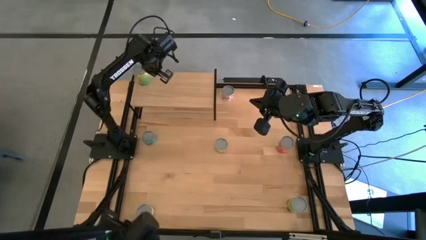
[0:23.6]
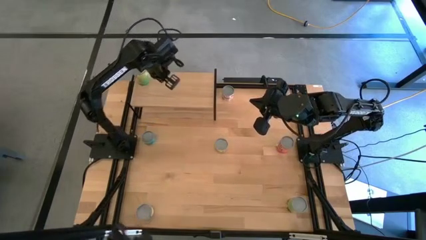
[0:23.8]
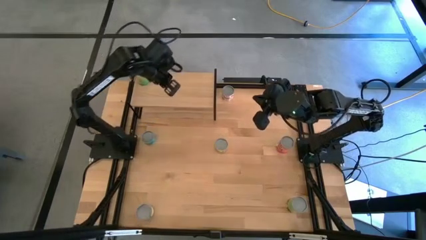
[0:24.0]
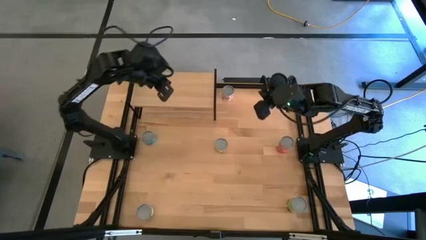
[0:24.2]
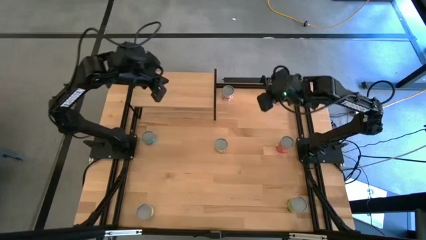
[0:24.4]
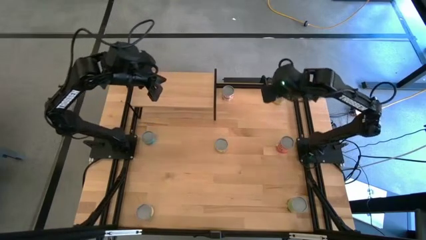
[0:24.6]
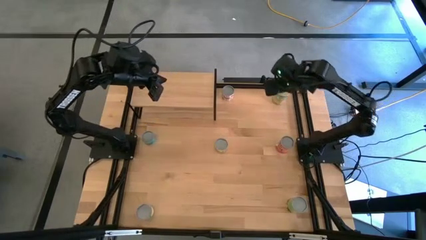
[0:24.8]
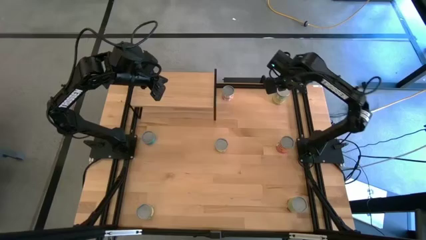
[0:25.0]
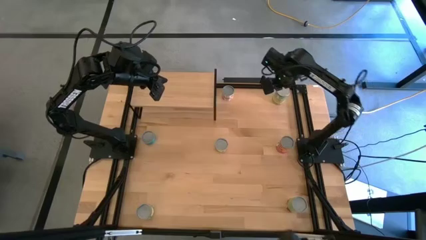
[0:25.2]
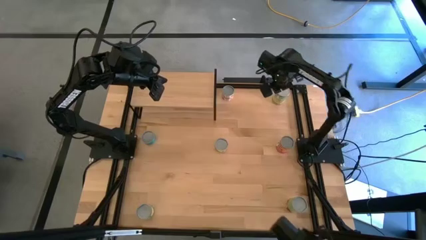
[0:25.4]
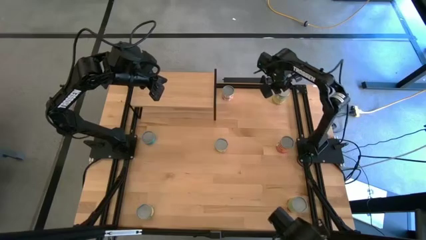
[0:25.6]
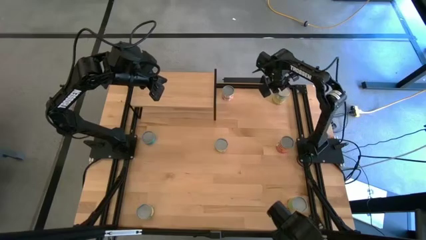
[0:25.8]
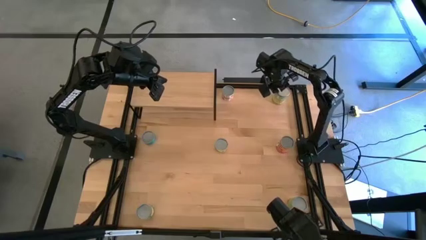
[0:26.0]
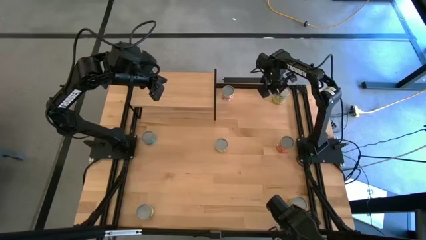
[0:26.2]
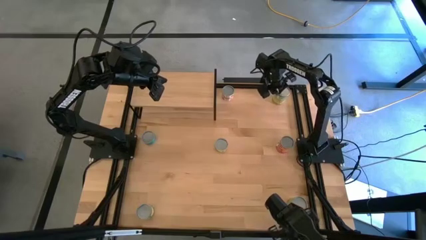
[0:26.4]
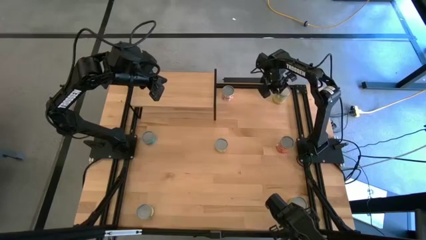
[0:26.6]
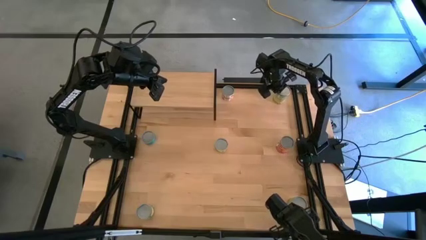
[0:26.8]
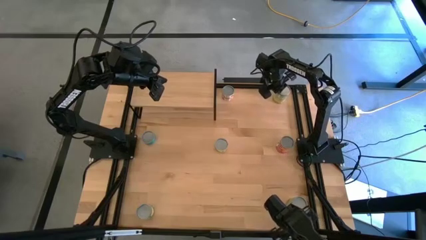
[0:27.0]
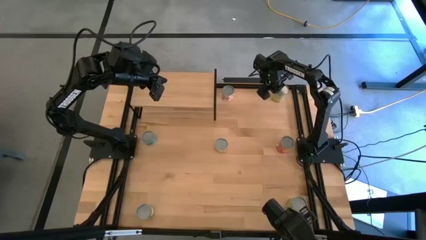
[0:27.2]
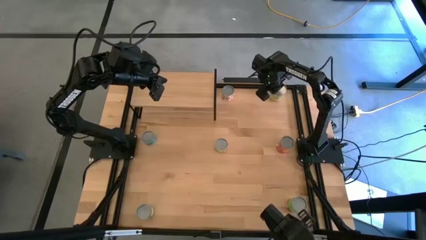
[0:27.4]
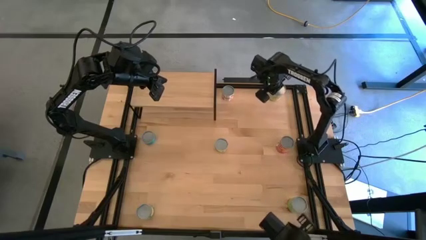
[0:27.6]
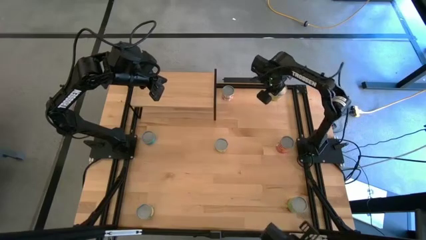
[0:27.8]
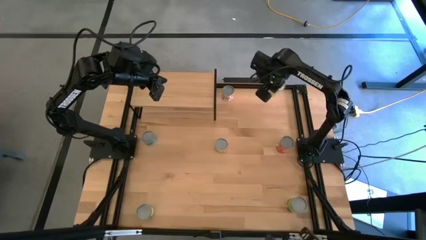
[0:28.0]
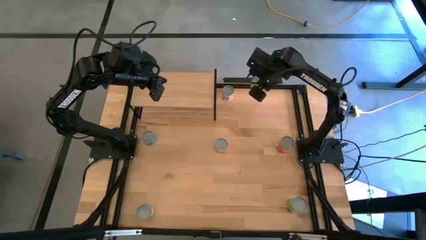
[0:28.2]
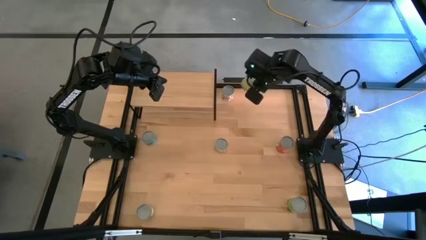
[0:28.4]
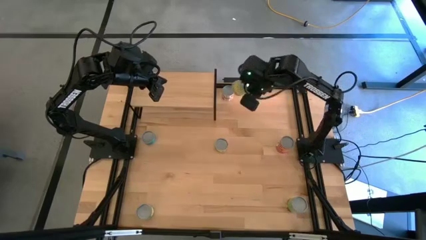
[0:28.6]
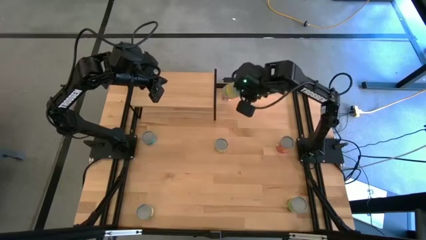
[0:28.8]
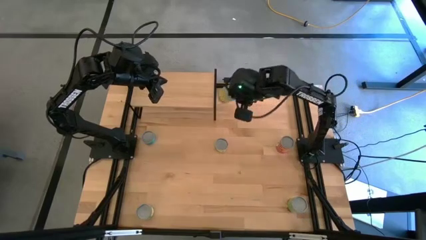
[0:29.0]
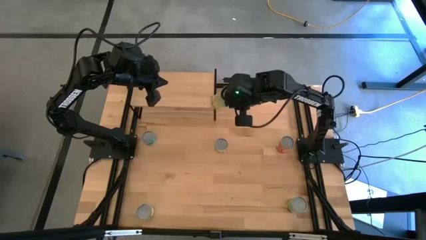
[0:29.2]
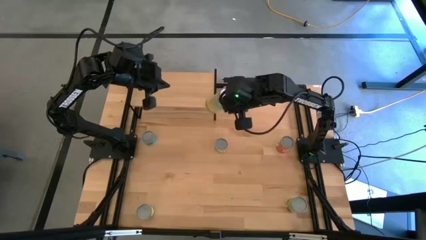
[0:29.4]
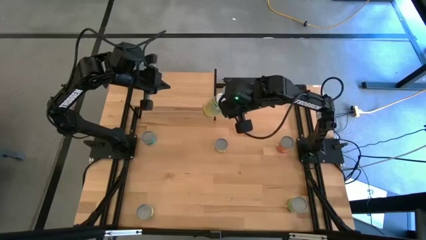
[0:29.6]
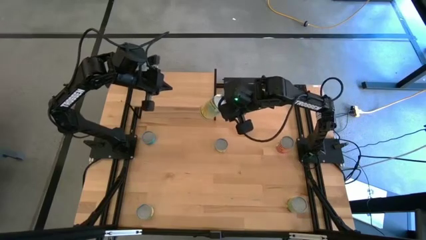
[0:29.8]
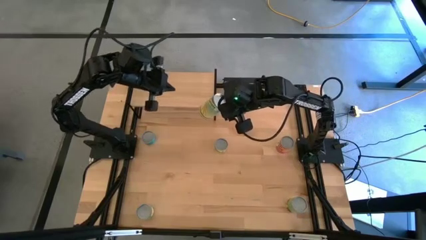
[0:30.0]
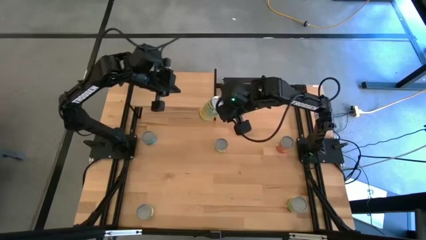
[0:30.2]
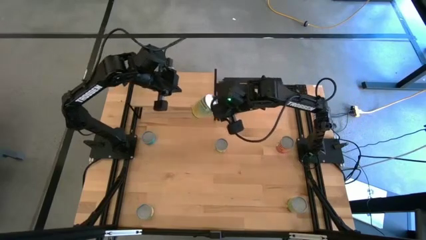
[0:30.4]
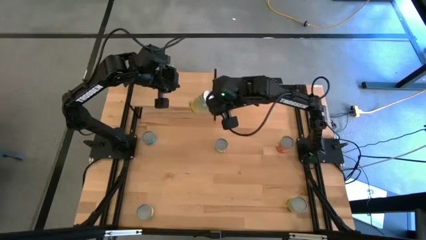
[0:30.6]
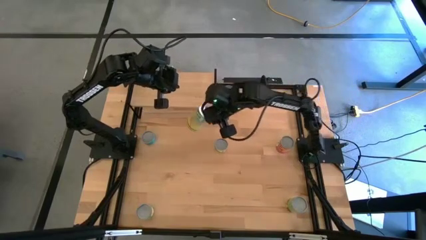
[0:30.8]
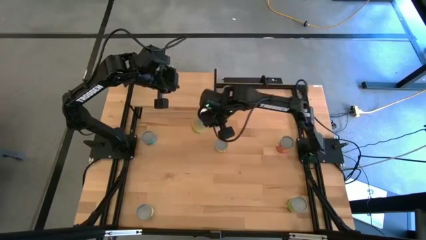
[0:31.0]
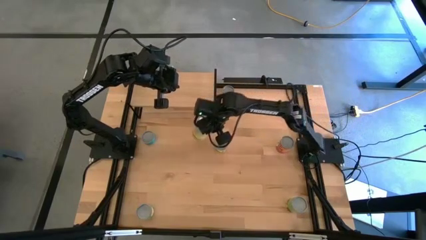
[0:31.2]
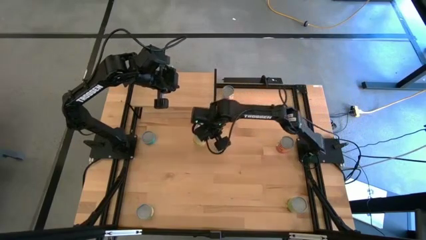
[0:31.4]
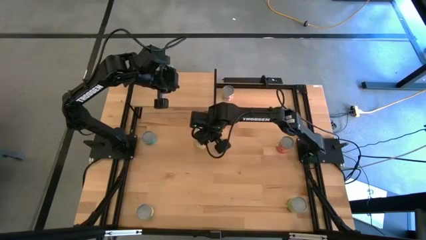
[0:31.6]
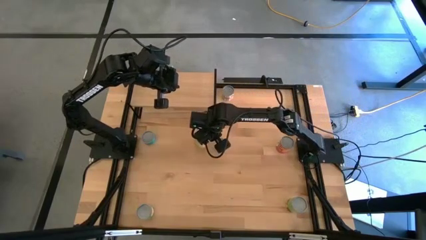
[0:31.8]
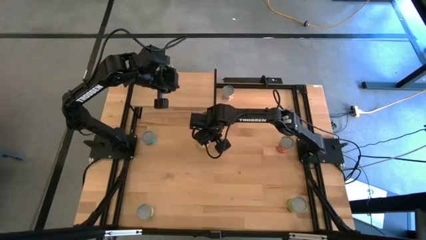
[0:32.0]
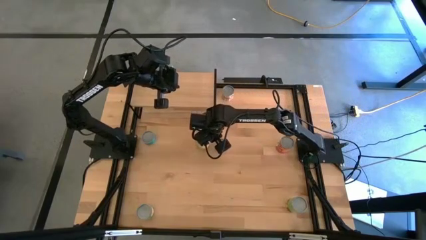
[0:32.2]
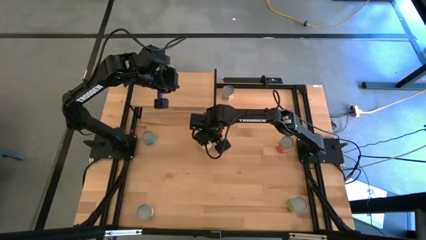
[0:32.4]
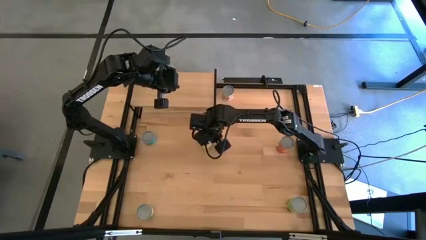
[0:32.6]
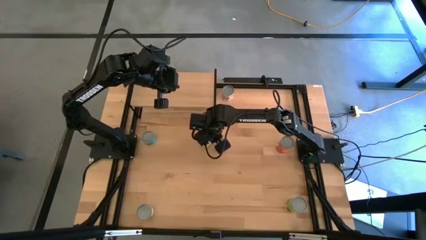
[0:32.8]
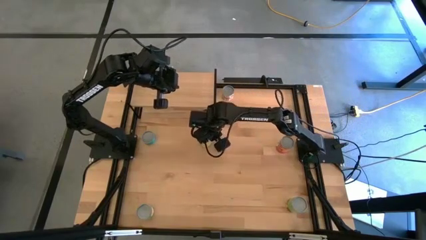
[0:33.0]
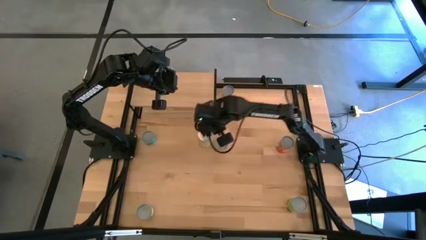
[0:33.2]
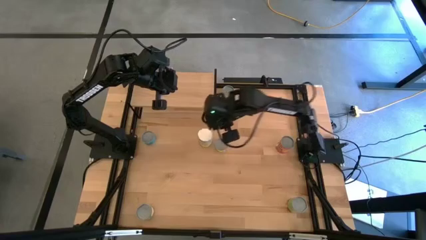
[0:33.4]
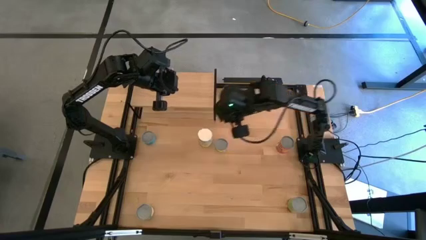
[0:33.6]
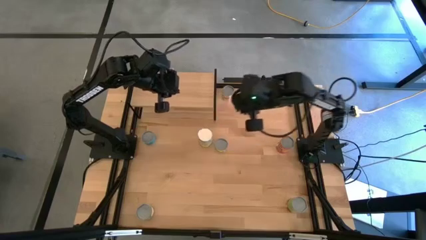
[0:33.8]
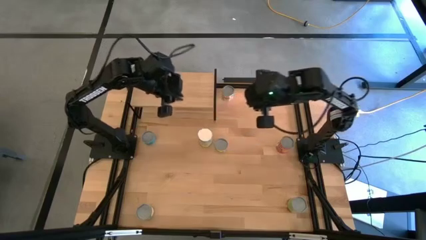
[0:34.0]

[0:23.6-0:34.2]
Task: Pick and place cans onto a shelf
Put the canned carrots on the shelf

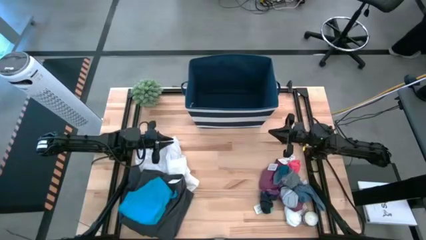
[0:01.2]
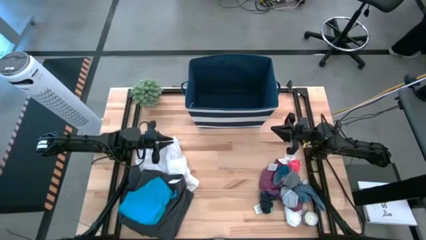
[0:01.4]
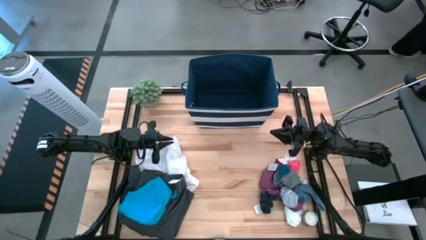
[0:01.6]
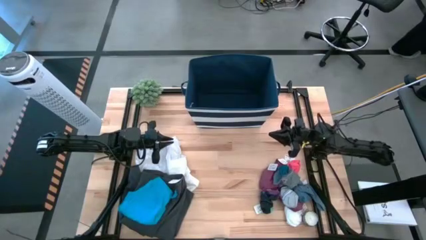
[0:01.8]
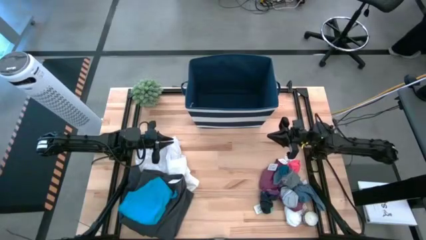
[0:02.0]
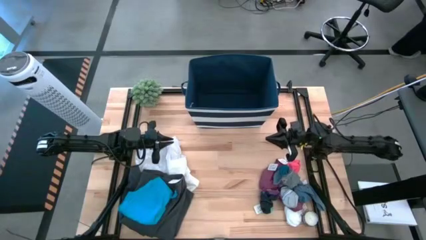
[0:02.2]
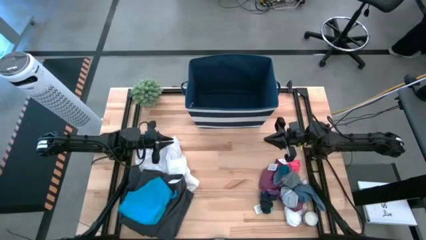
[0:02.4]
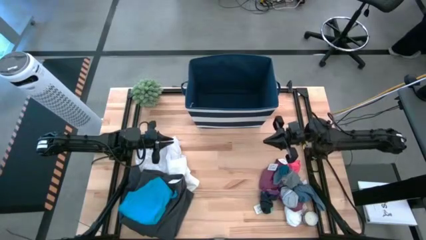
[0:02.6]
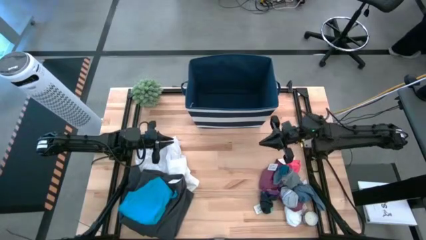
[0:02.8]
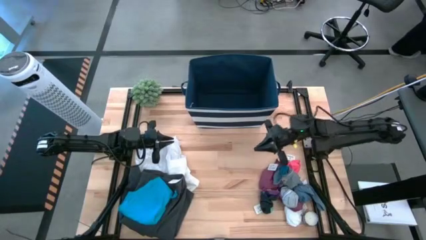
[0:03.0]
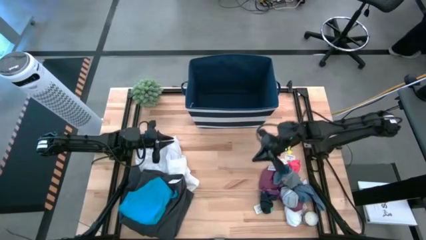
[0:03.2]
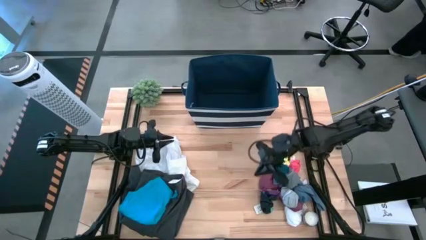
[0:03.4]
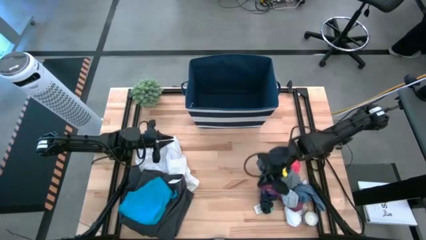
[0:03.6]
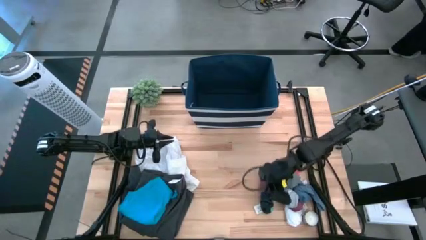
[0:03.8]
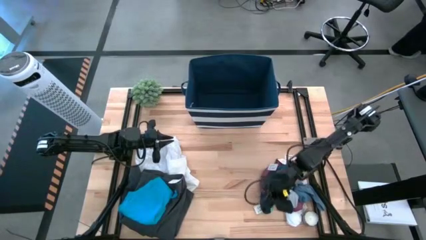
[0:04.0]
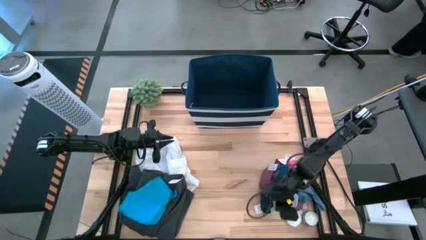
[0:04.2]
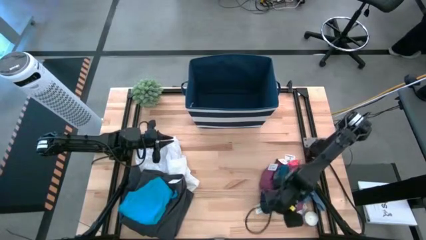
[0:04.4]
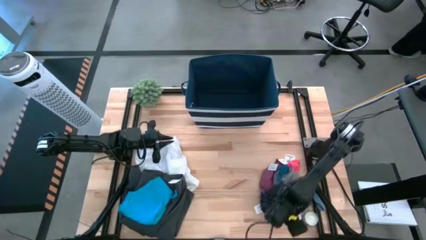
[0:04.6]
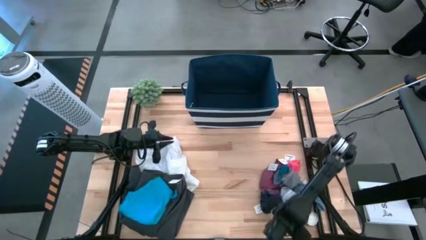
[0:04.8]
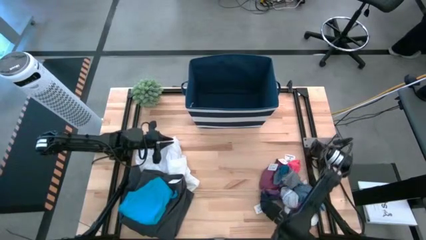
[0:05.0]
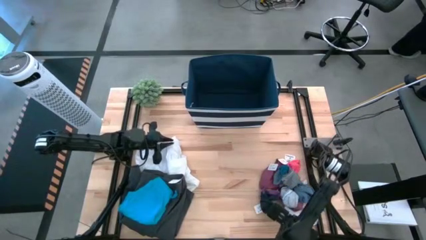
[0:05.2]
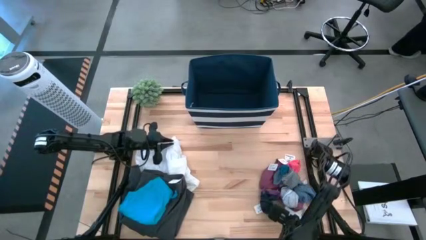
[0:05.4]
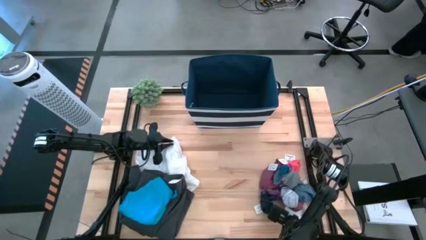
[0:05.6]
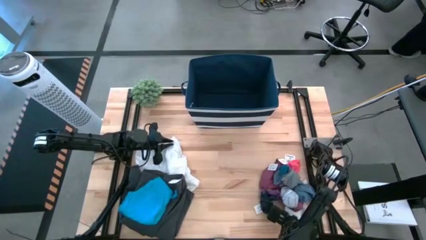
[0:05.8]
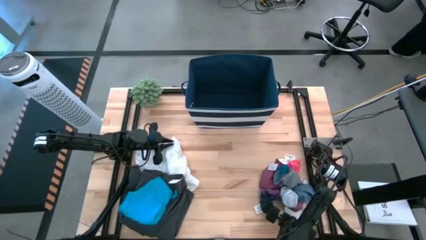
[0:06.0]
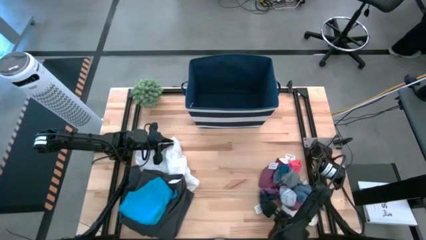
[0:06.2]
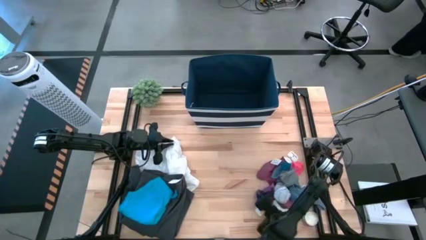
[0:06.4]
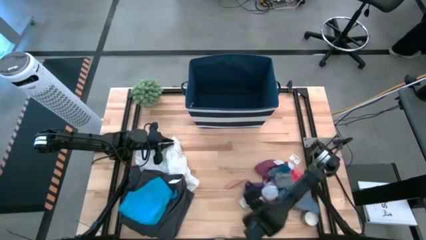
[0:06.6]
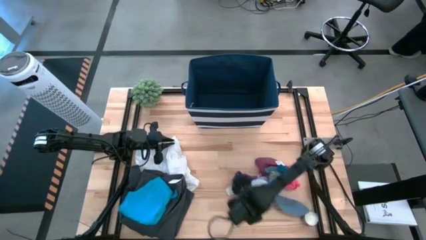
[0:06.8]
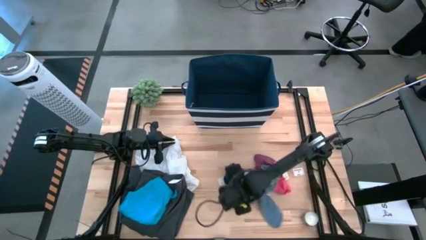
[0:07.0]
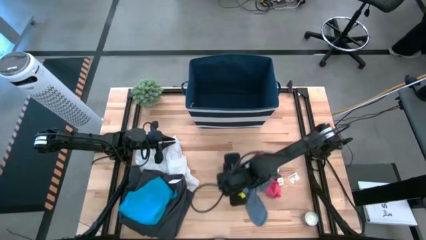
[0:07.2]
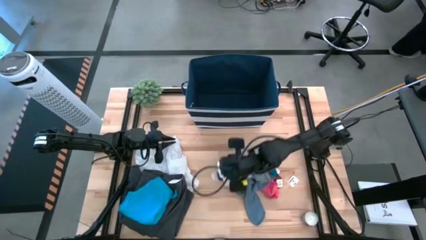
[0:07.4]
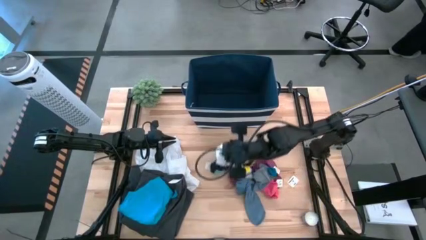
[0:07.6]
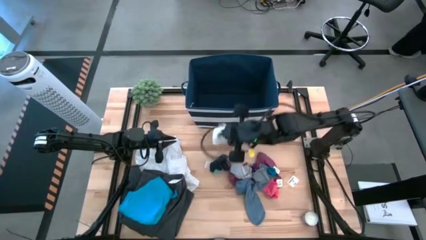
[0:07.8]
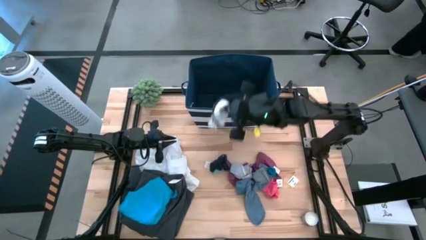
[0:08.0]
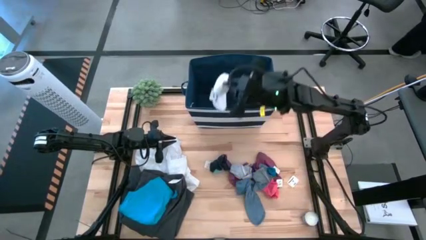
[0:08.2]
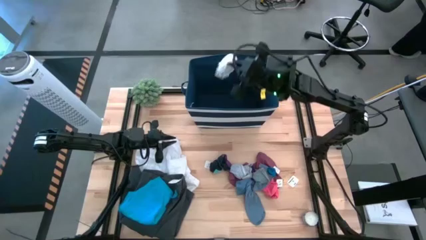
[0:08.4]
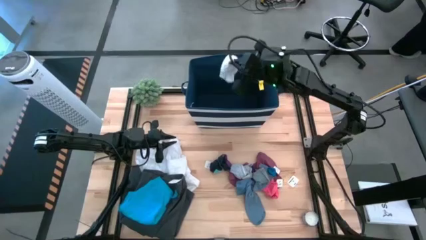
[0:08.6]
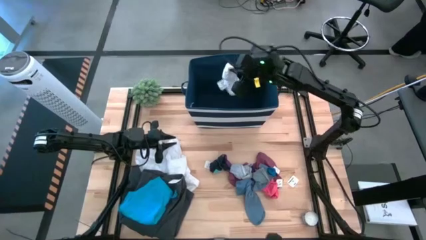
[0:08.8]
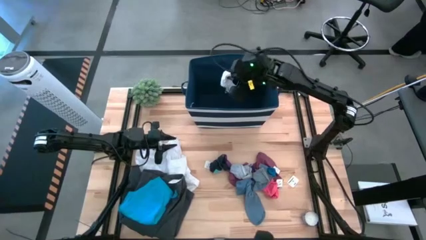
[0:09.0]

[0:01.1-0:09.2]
Task: Sort clothes
Put the white sock into the blue laundry organizer
